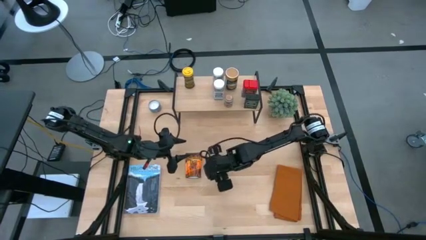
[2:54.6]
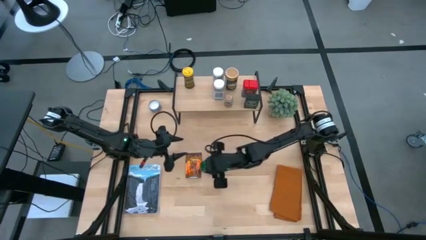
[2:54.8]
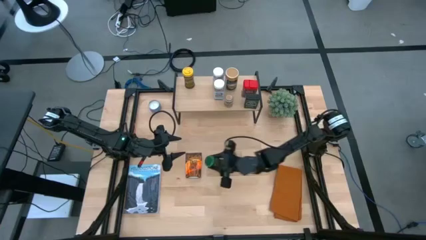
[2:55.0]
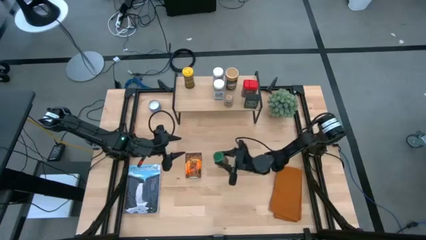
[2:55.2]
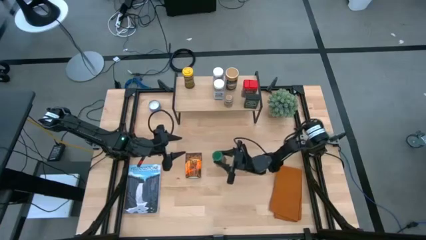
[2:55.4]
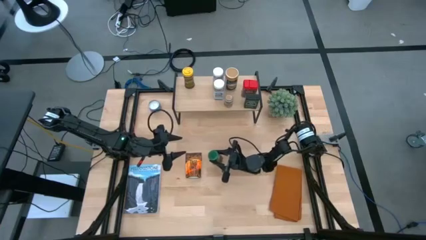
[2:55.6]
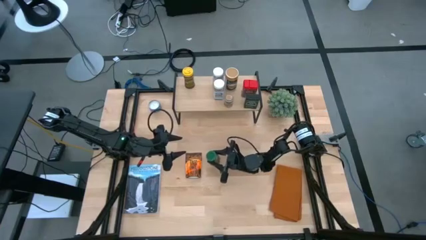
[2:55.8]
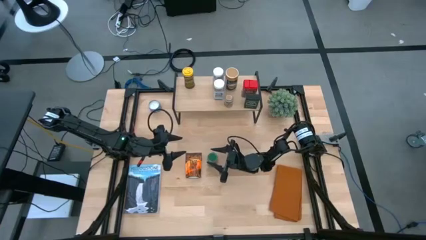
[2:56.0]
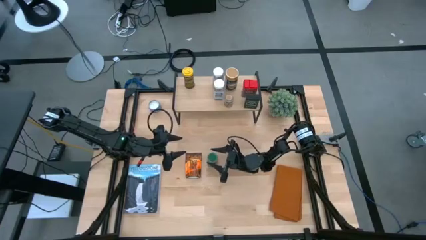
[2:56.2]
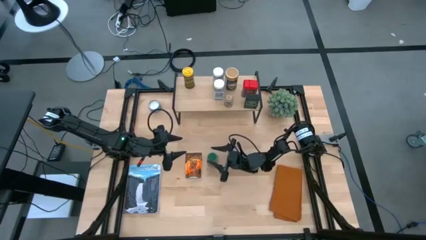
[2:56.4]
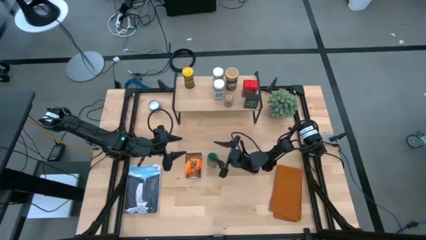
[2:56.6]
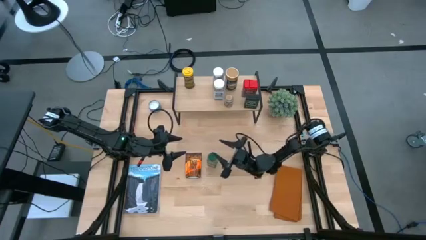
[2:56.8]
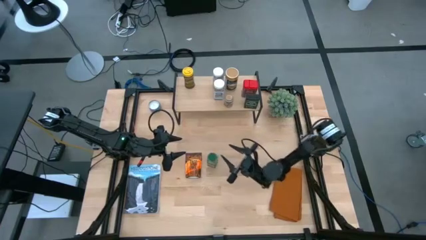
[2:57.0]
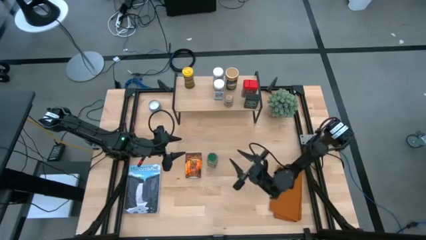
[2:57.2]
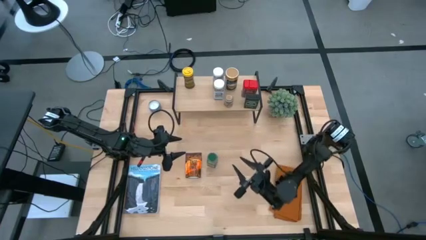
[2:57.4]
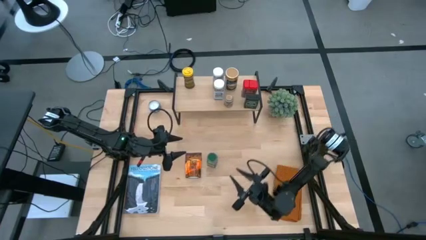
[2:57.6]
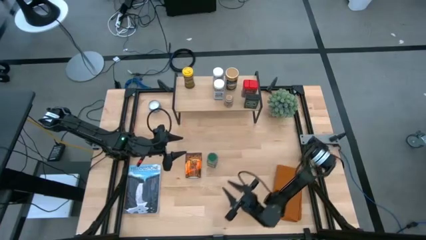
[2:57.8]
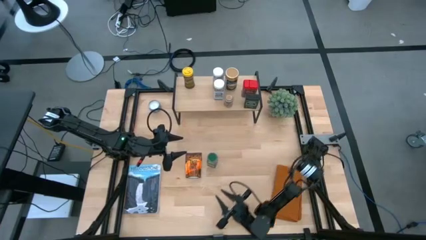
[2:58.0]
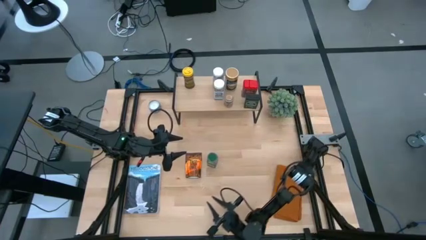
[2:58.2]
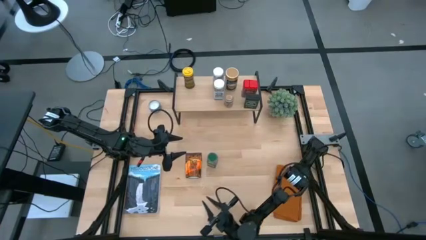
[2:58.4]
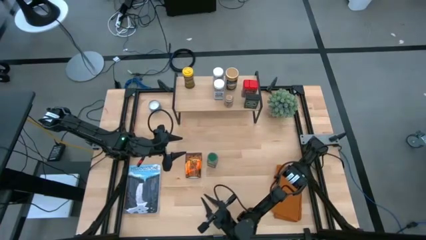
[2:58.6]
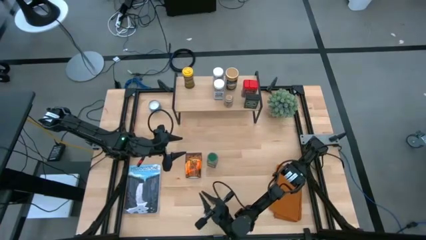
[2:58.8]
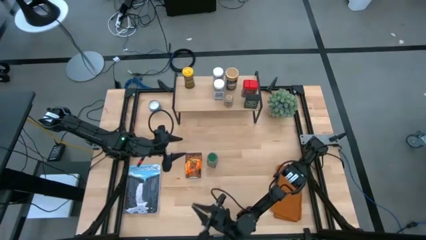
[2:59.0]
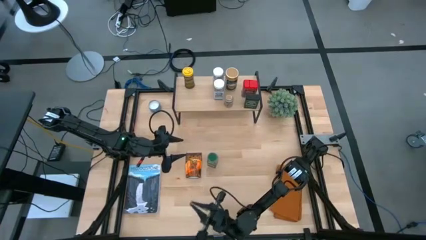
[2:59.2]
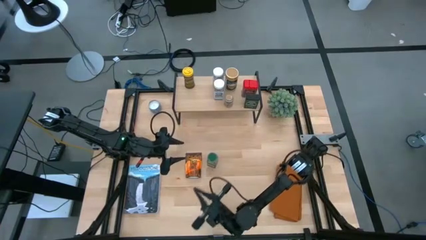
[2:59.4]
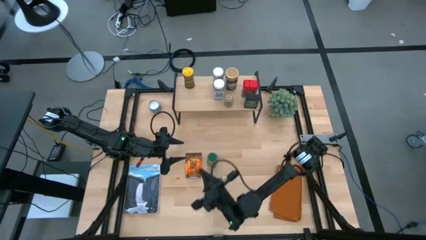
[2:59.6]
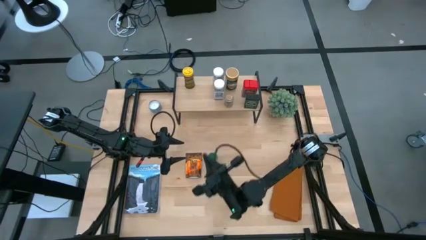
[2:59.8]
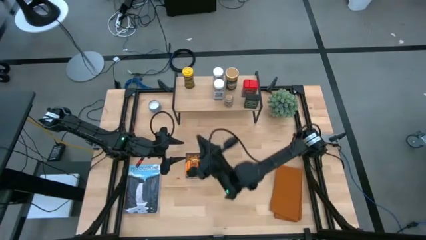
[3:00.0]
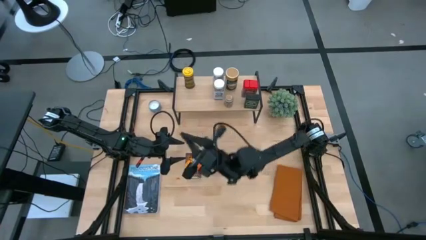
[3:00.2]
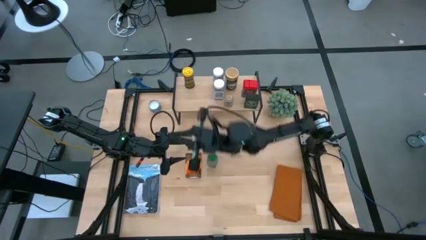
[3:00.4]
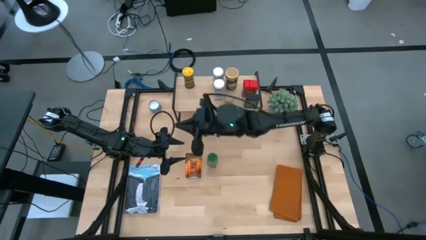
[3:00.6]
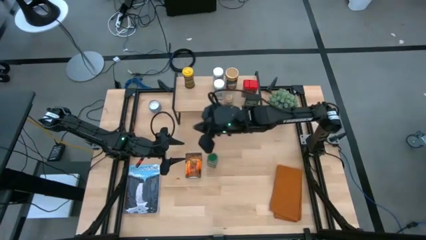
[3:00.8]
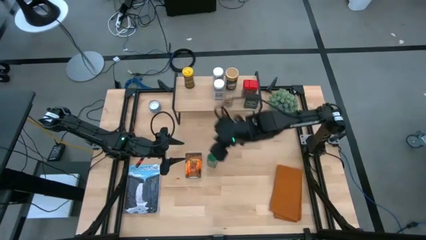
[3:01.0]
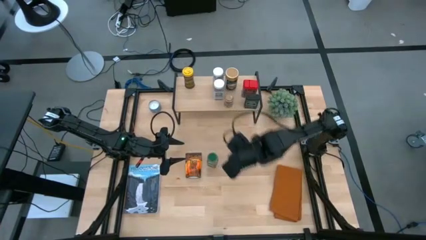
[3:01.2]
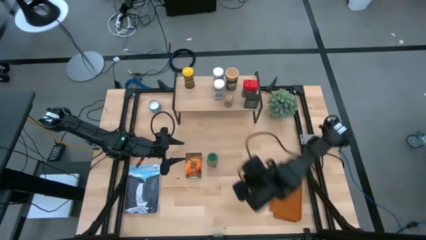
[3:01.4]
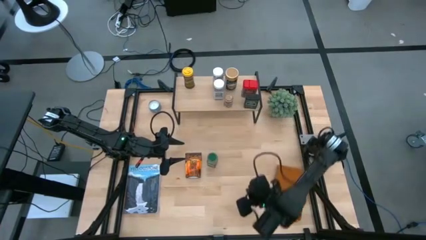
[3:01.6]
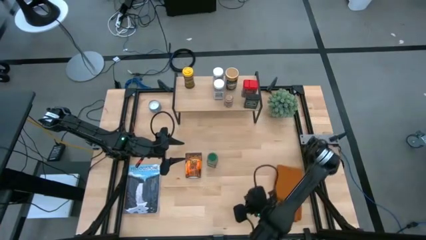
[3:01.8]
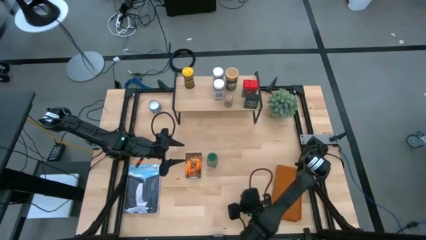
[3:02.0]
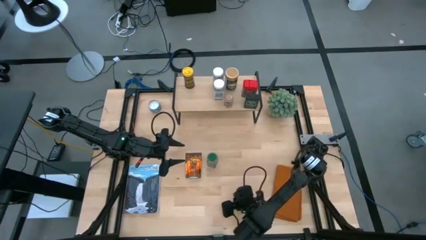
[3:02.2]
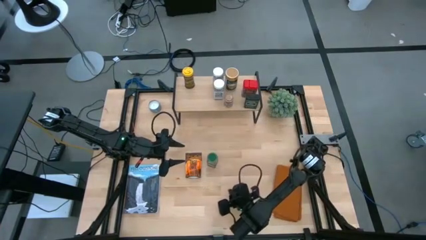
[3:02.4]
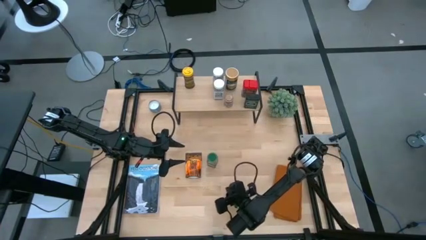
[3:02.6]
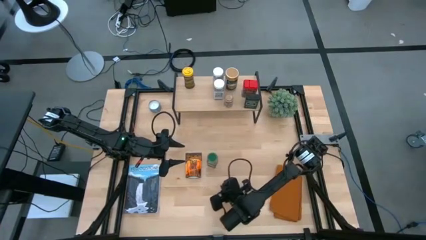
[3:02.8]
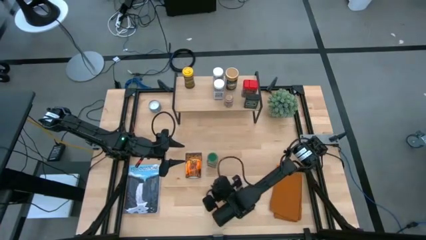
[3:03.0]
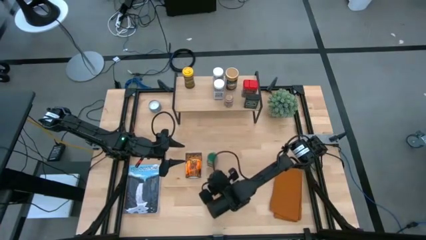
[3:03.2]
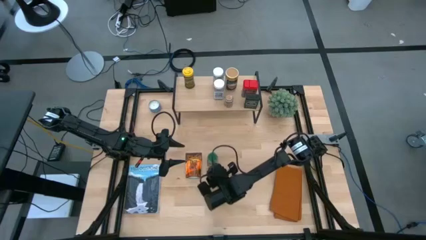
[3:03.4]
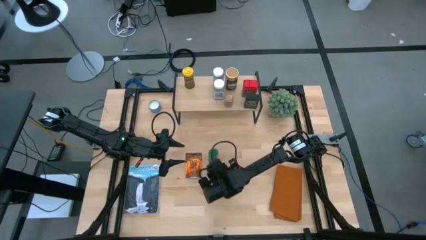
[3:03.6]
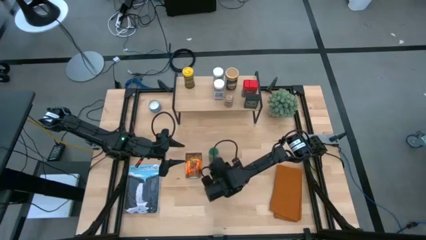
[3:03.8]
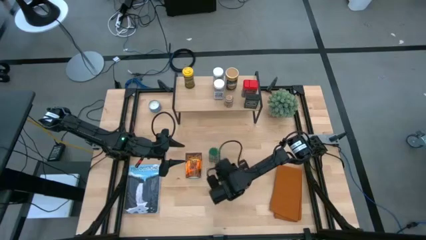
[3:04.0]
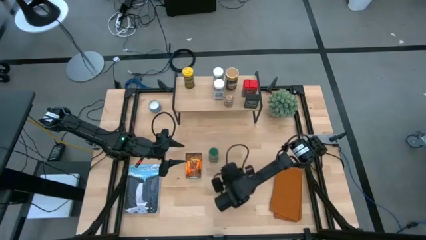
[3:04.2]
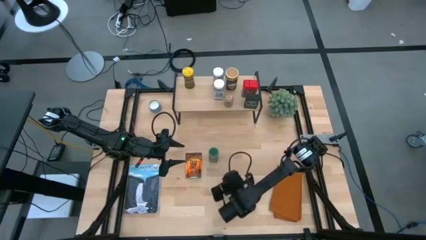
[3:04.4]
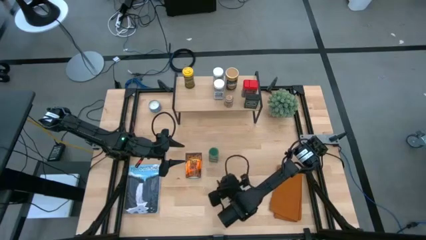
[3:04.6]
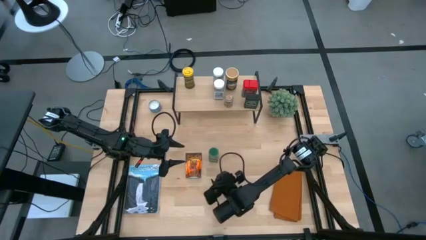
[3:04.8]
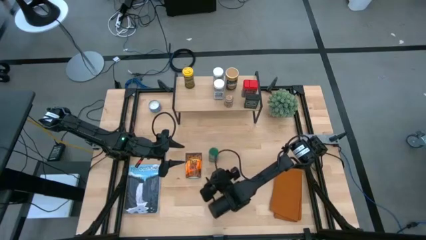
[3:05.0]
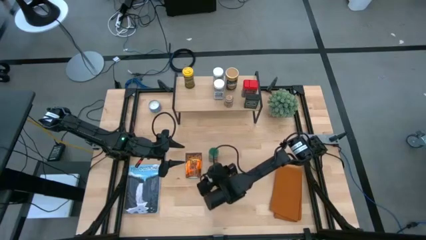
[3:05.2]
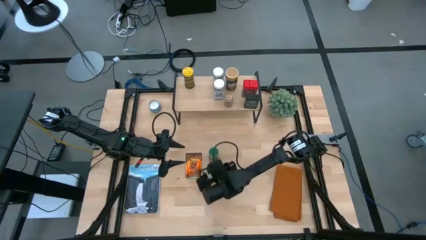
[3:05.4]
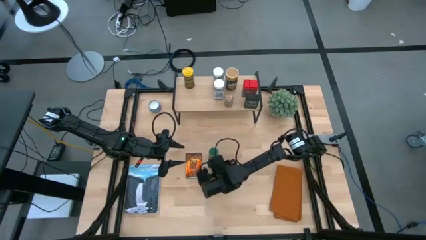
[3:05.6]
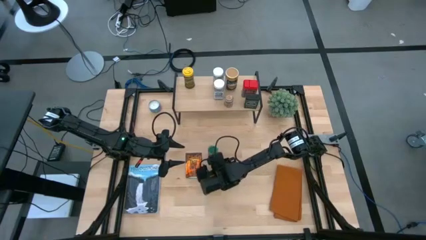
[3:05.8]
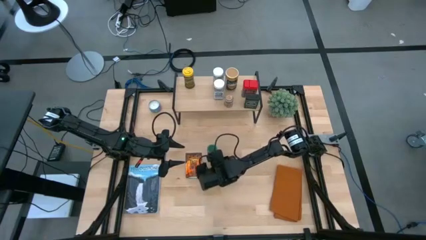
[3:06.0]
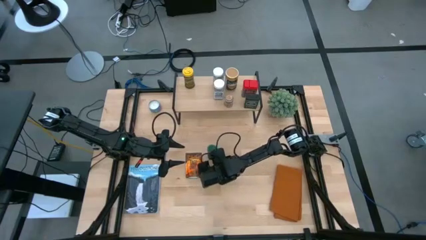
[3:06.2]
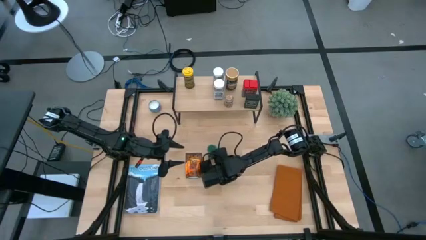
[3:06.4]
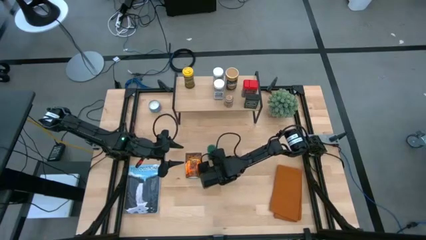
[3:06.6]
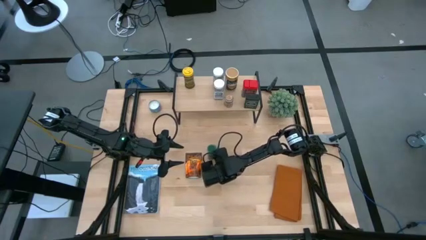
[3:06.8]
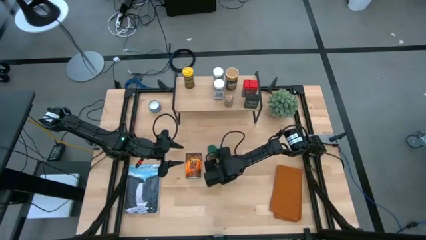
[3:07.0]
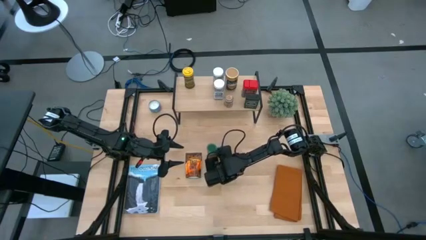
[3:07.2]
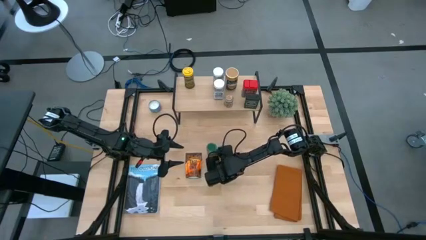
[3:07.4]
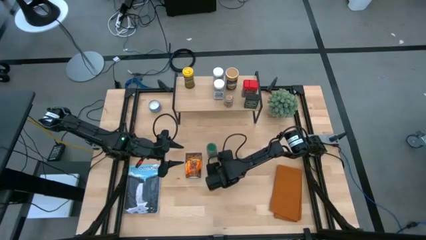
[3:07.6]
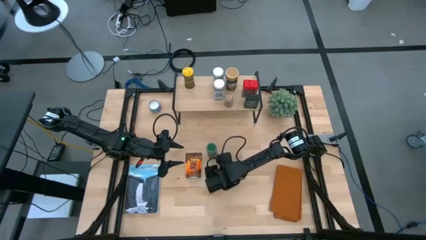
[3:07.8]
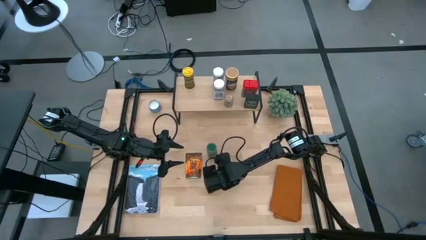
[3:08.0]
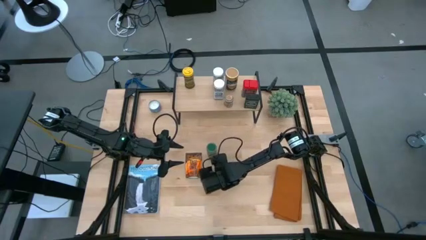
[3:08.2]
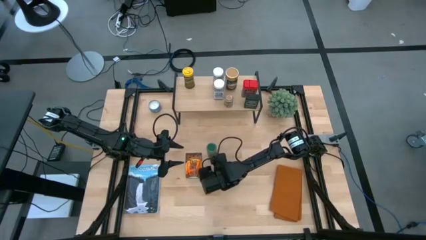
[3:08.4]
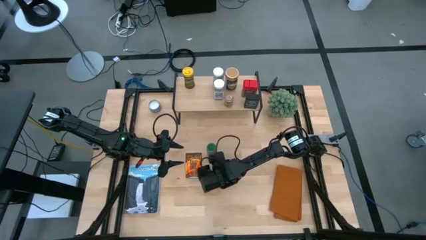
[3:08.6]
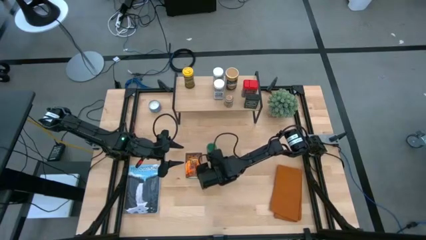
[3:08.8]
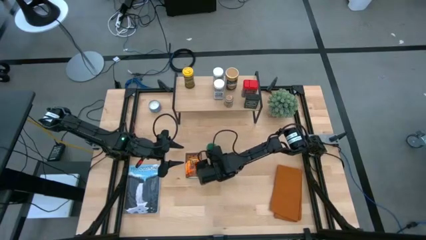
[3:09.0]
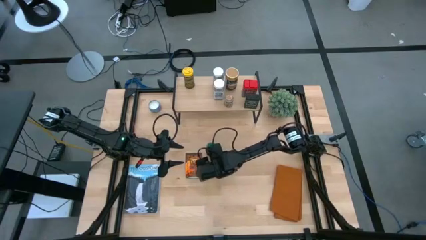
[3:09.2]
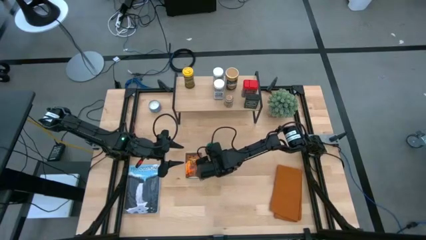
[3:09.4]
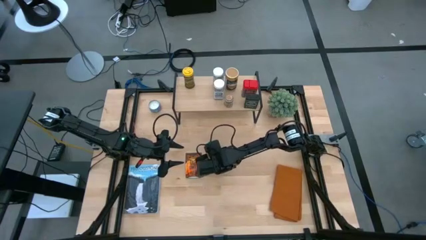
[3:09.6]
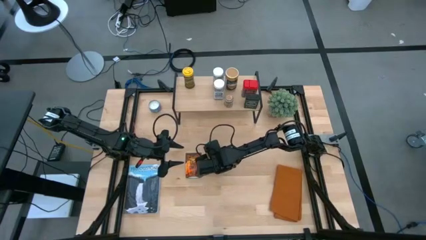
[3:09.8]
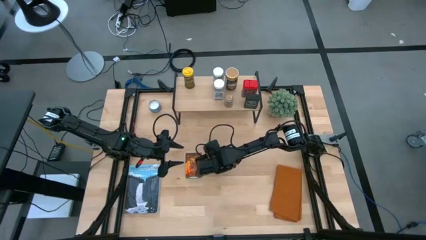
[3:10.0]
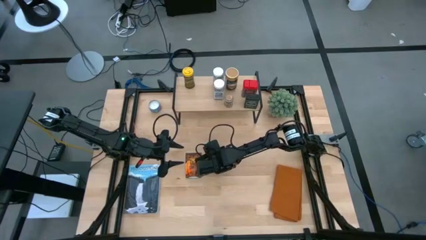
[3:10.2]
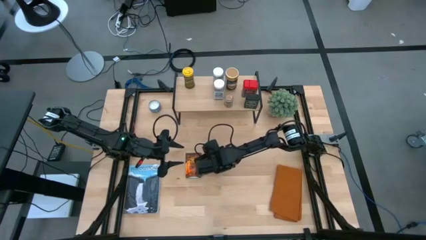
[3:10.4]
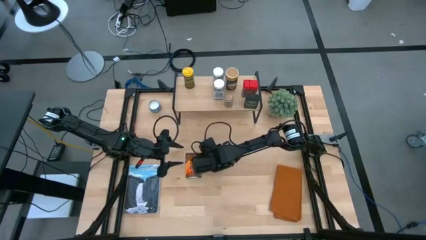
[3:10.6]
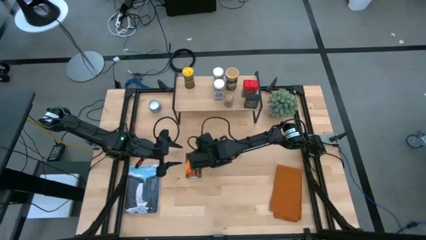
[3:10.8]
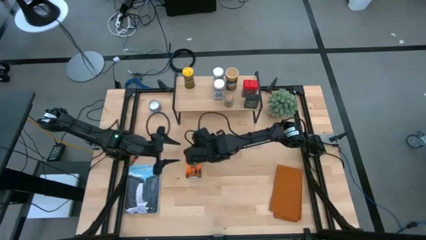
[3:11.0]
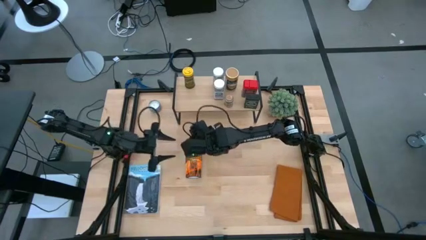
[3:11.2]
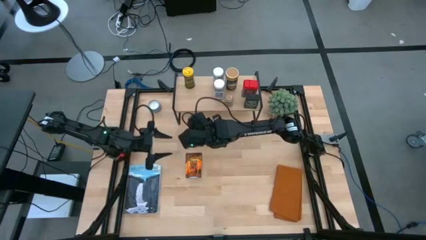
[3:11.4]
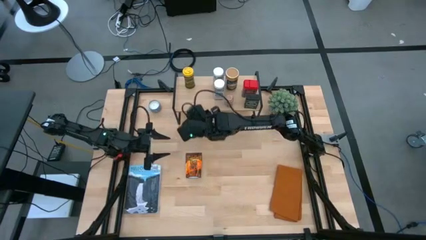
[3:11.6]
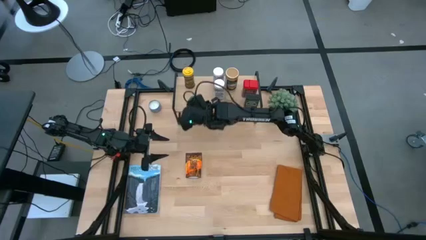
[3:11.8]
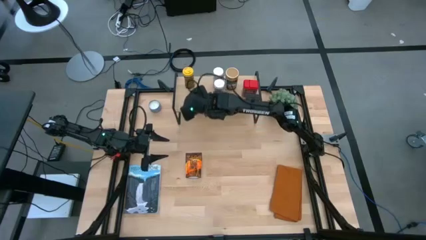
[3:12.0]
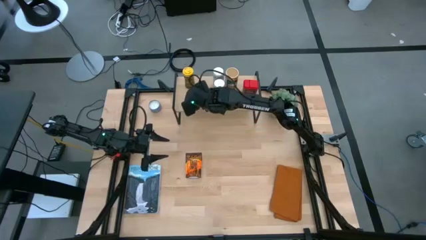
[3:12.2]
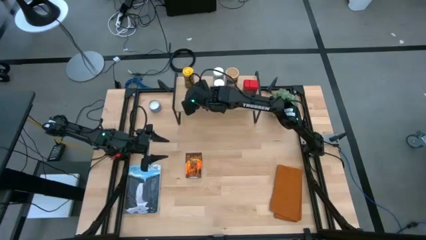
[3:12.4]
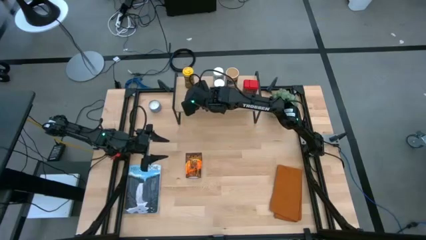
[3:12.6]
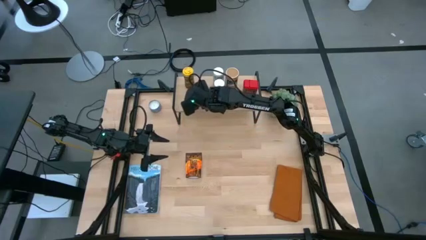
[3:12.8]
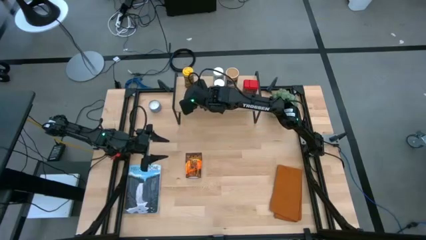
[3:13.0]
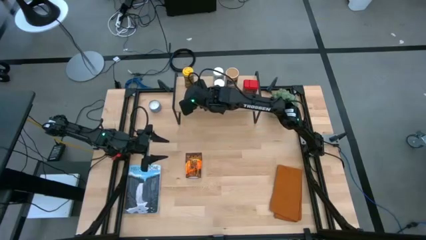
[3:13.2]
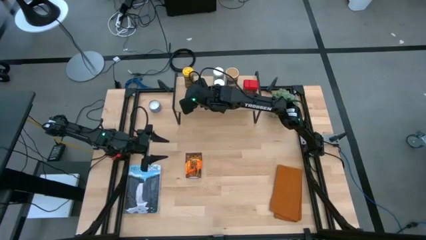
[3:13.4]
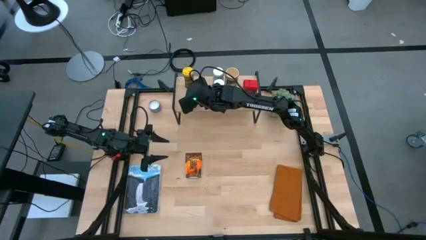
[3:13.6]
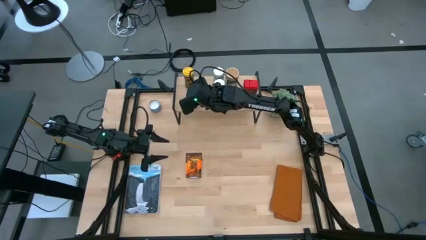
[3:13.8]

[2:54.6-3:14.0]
Task: Shelf spices
Put the green bottle seasoning on the shelf
